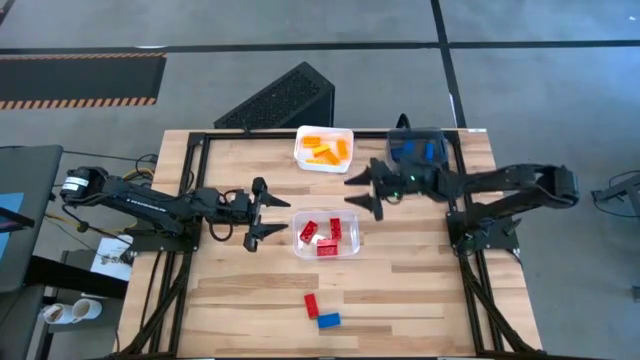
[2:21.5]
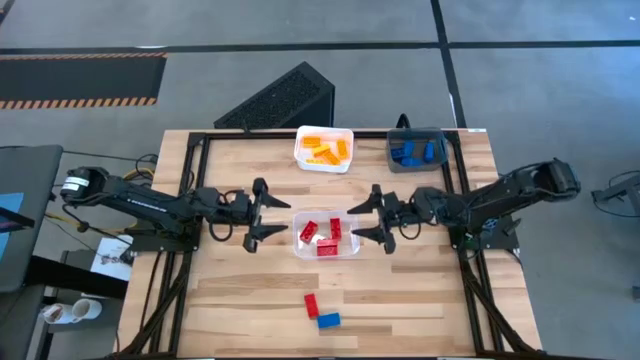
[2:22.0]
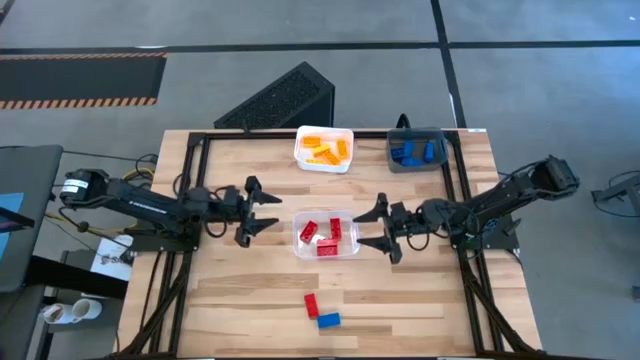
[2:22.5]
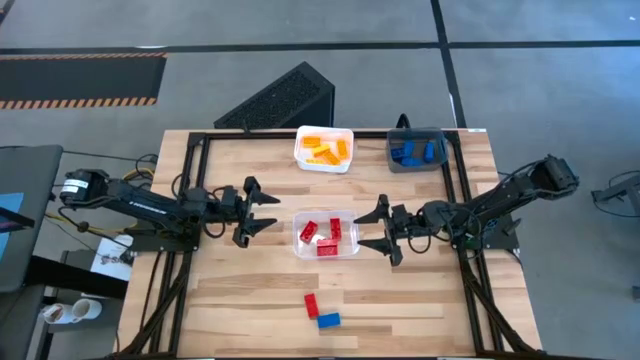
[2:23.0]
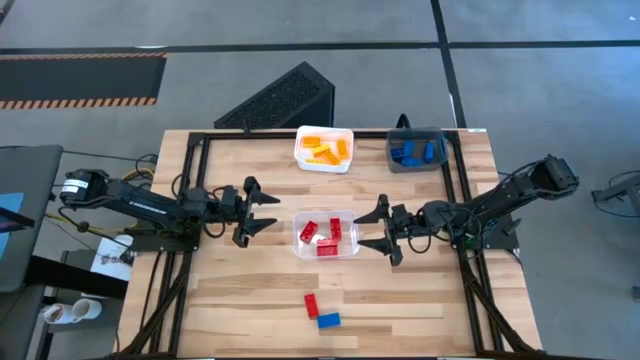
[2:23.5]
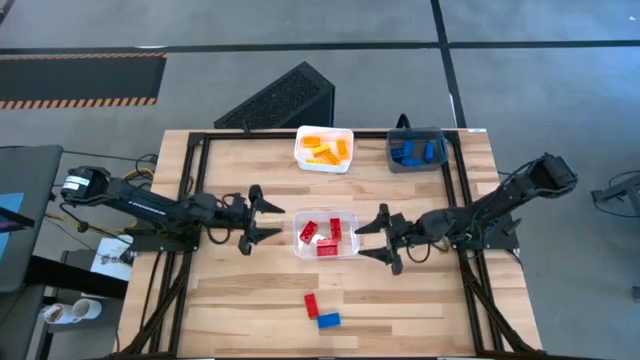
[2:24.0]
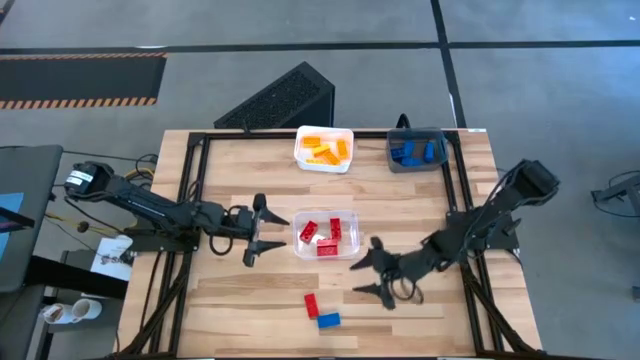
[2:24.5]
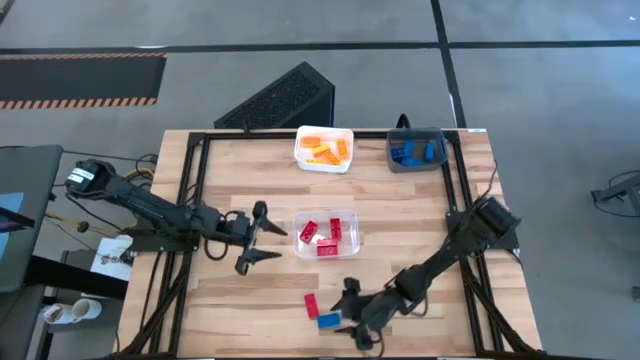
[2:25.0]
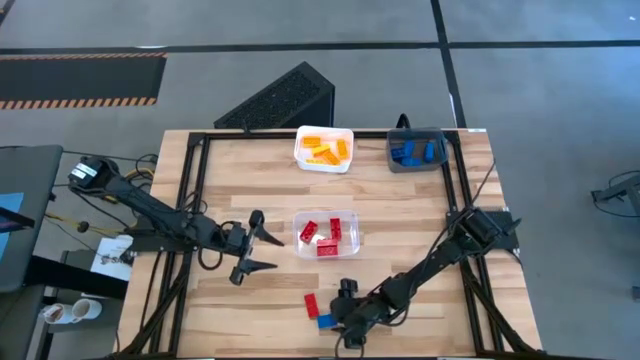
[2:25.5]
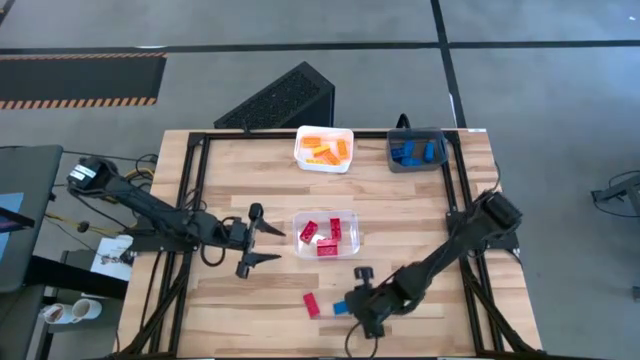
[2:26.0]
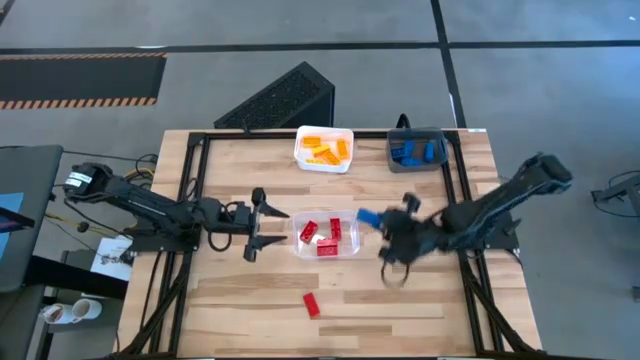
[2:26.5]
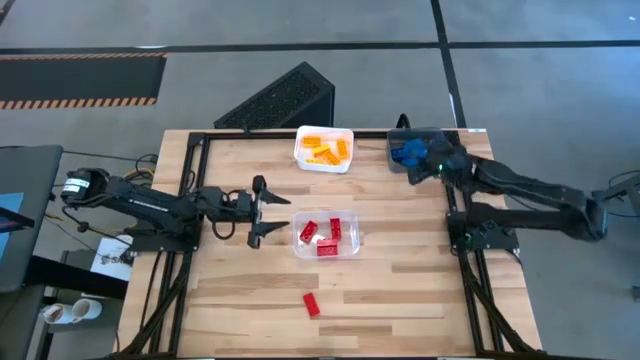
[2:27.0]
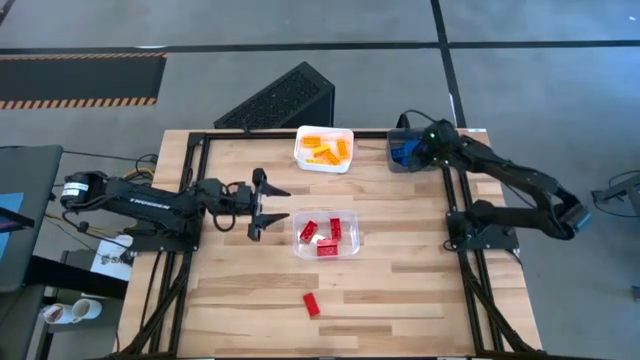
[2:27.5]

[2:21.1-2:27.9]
Task: Sort & place blocks by color
Put the blue game piece into the black bin

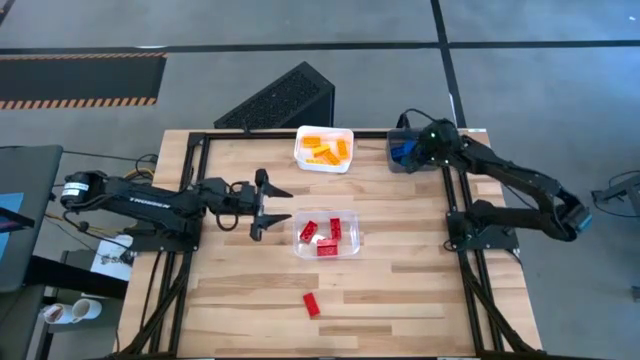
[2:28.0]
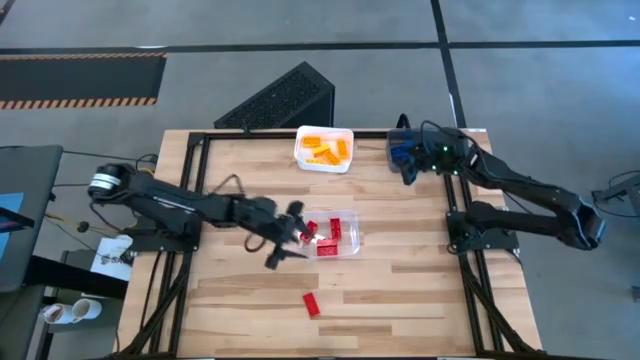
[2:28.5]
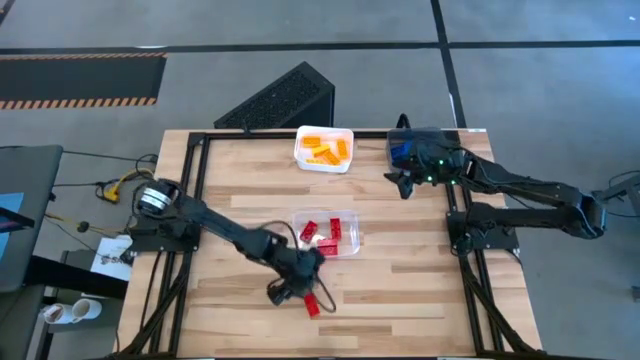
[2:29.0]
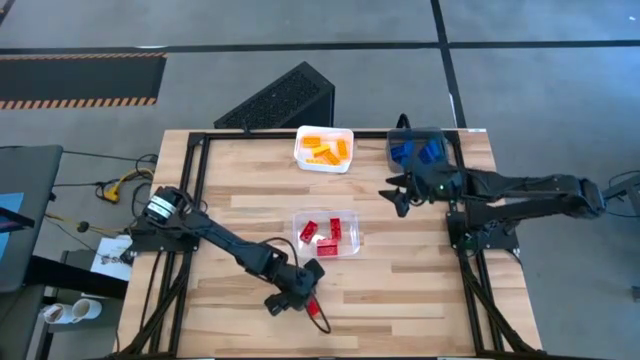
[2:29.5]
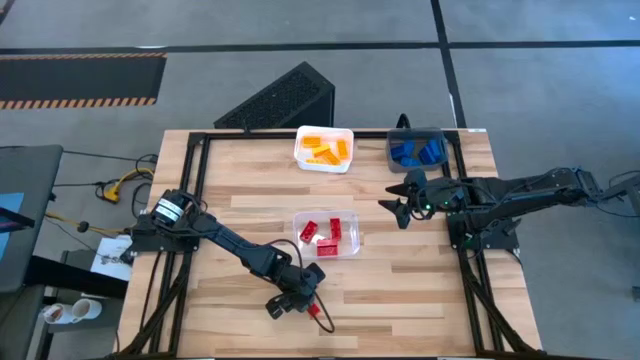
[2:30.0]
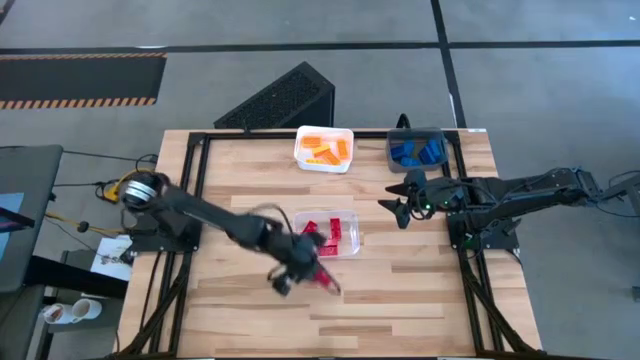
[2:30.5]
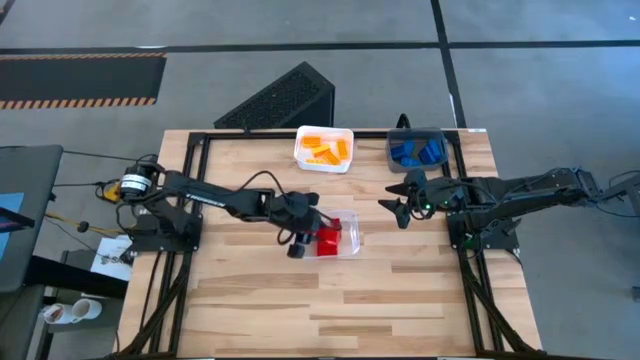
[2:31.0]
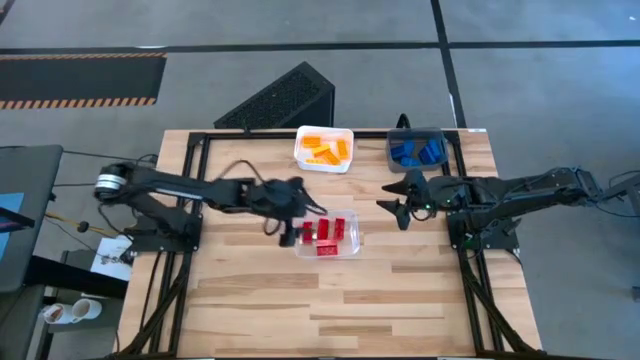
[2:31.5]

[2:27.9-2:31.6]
Put the red game piece into the transparent bin

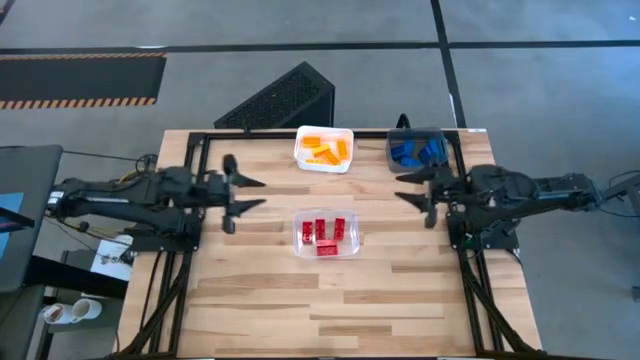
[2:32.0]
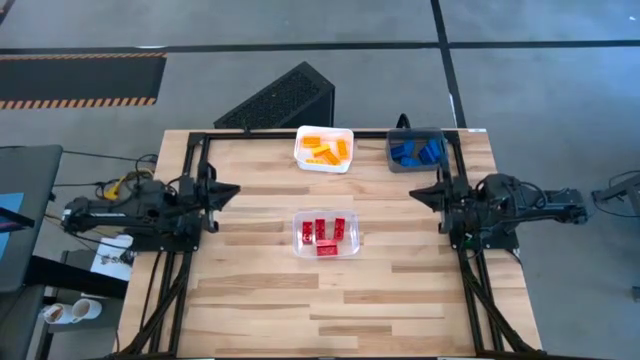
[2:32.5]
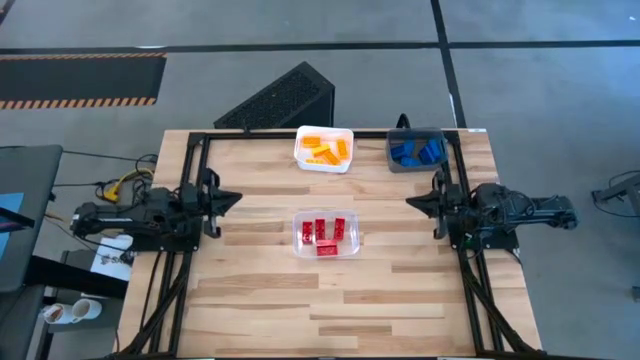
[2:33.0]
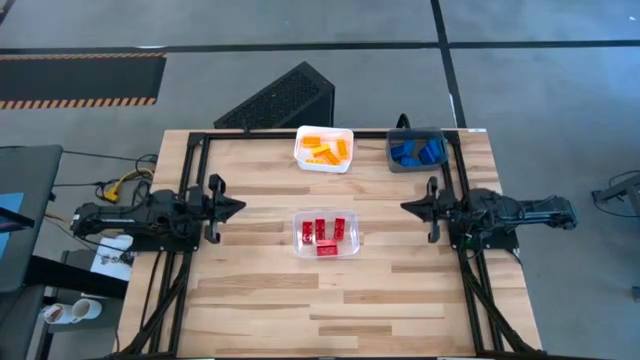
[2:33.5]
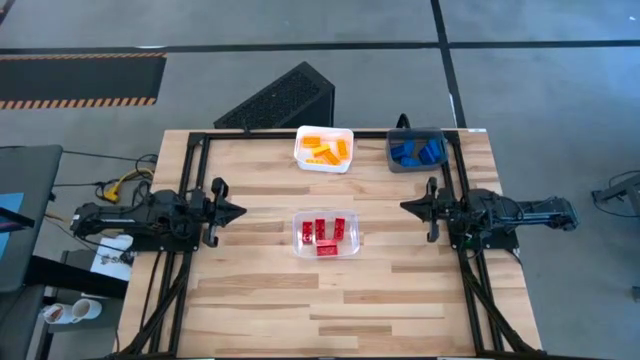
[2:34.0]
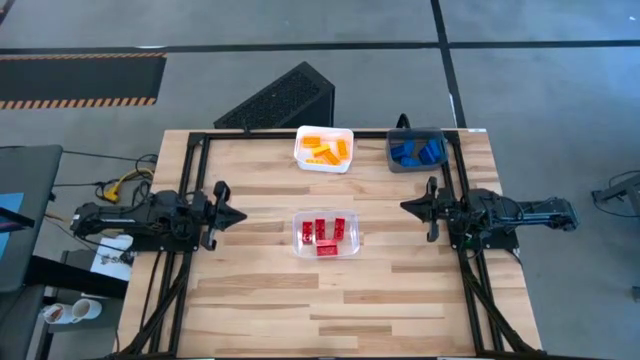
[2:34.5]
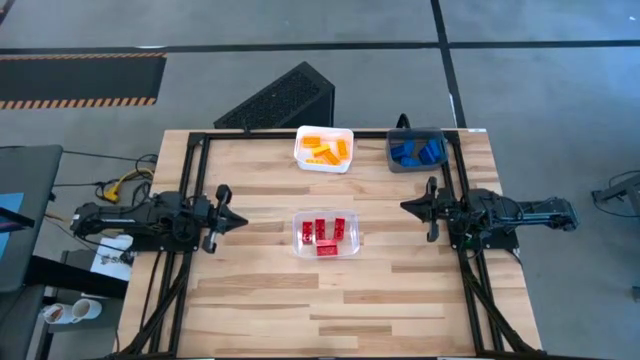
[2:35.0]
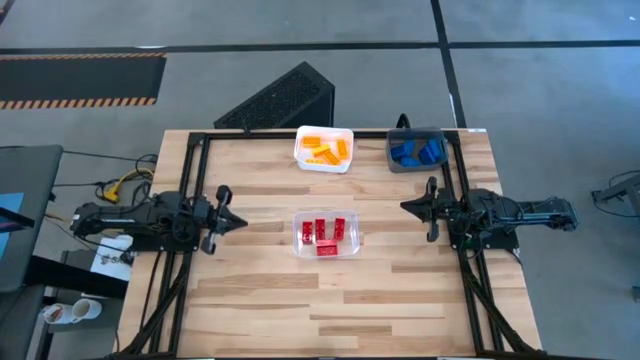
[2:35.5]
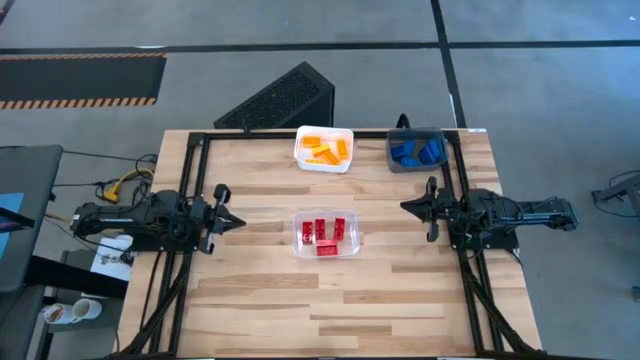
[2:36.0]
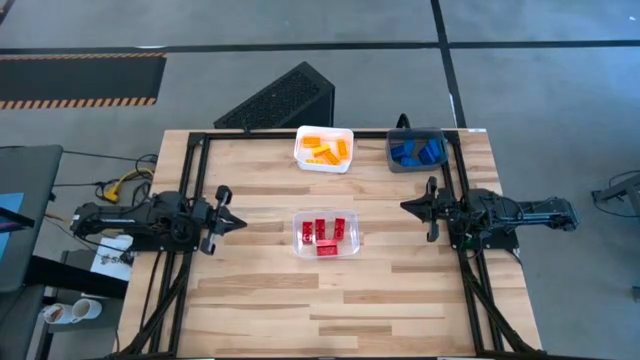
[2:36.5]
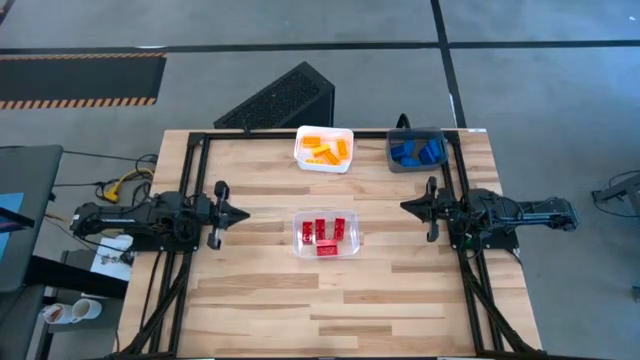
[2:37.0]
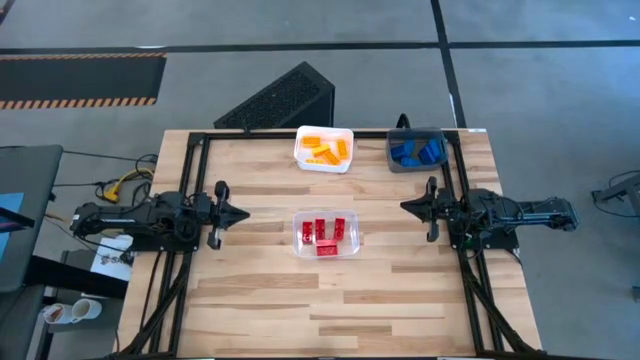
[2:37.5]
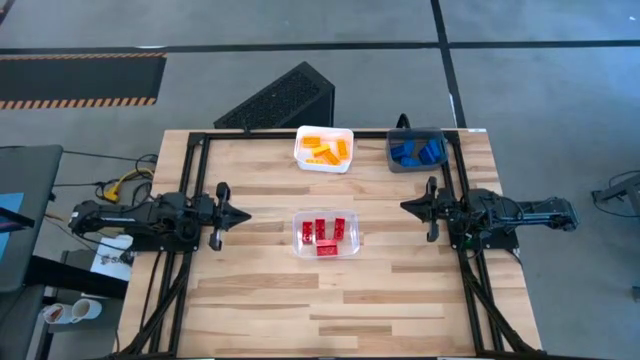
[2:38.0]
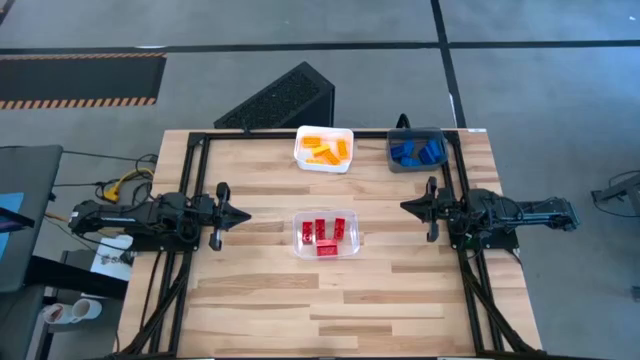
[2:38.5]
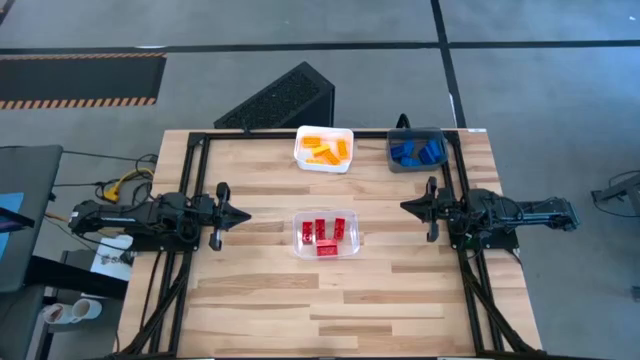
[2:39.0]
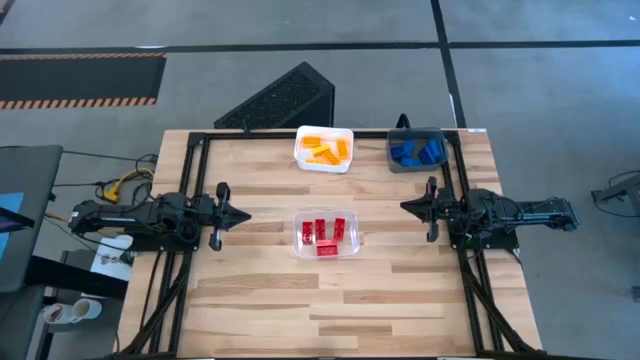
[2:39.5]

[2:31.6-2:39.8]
Return to Home Position

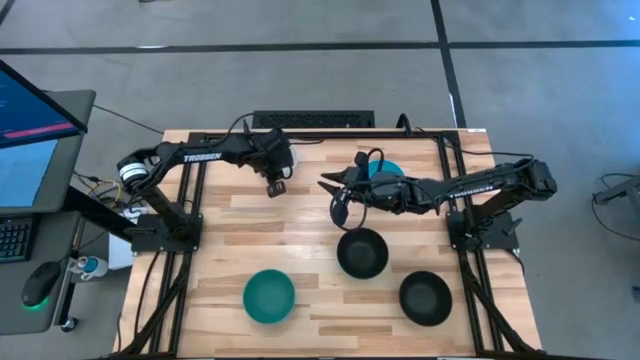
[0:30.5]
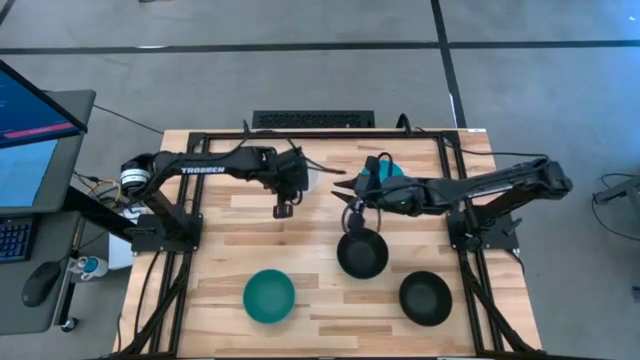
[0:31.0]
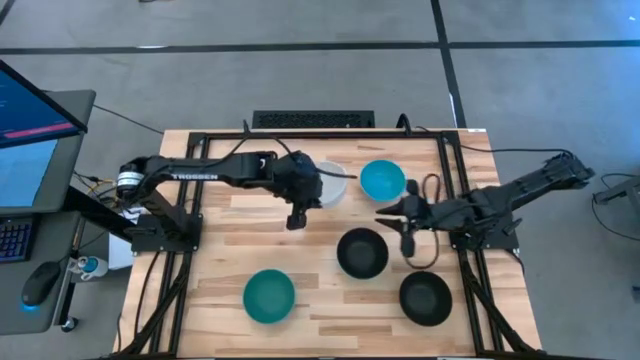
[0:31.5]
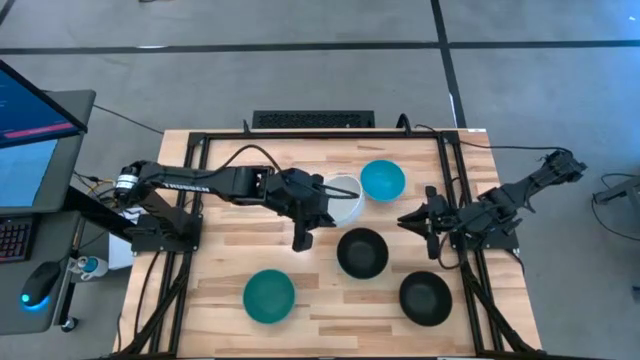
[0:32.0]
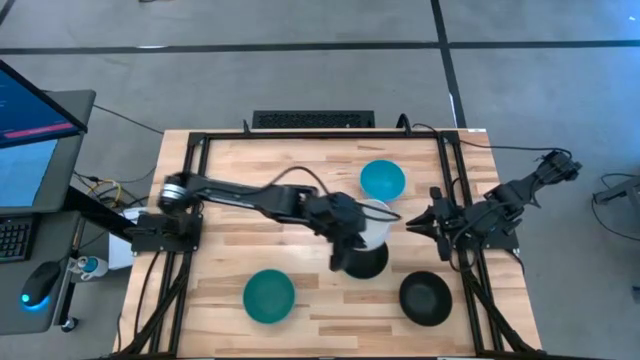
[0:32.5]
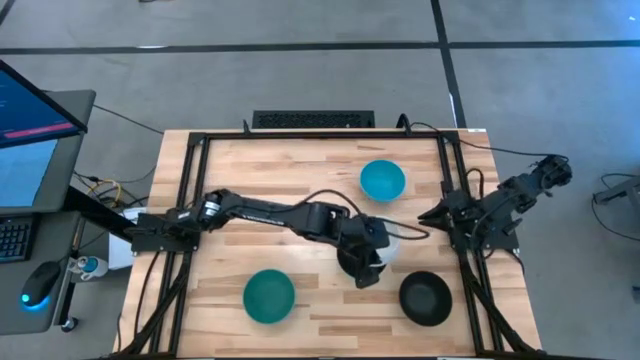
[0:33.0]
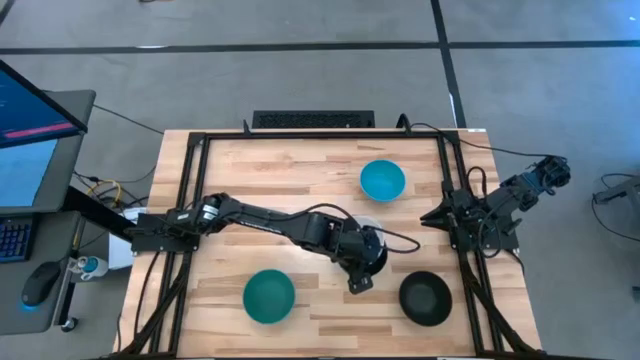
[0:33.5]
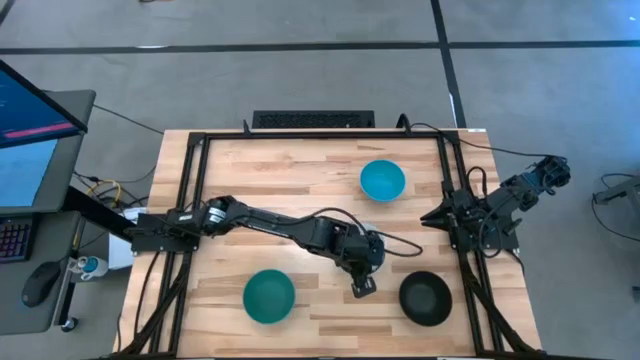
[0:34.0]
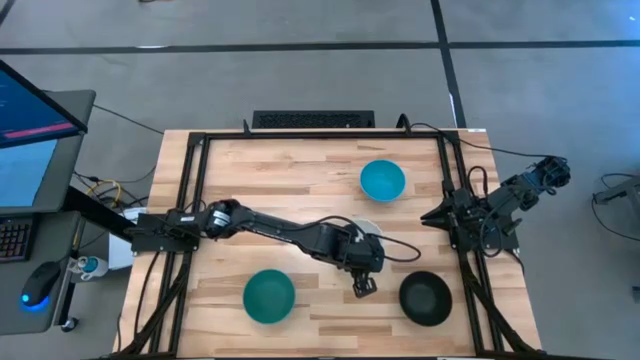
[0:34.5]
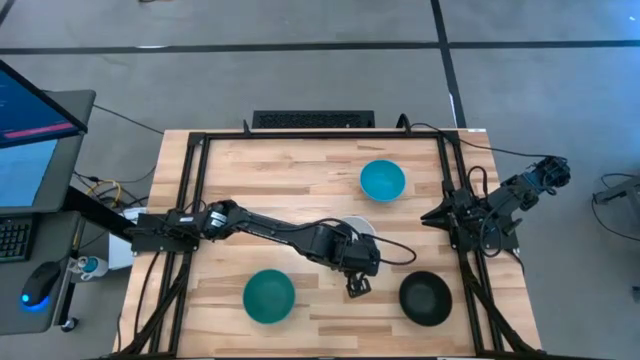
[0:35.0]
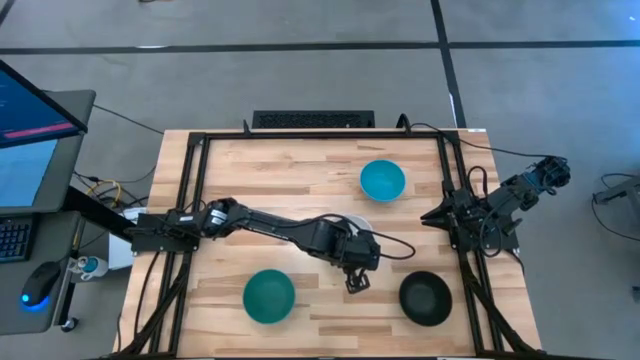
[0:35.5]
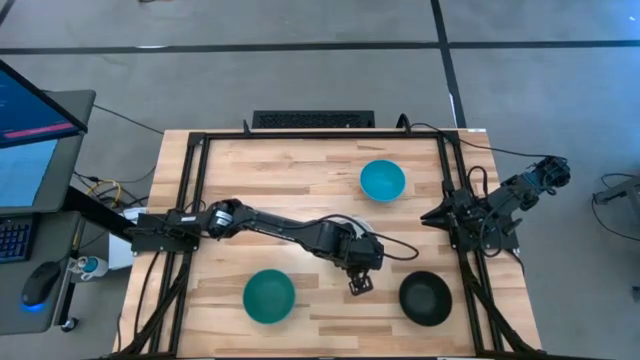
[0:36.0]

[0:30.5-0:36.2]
Task: Nest bowls inside each other
Stack the white bowl on the black bowl
